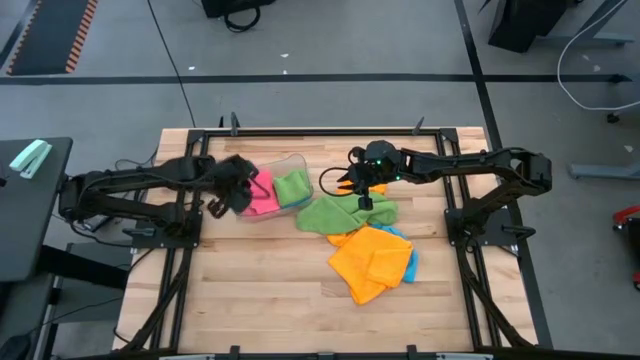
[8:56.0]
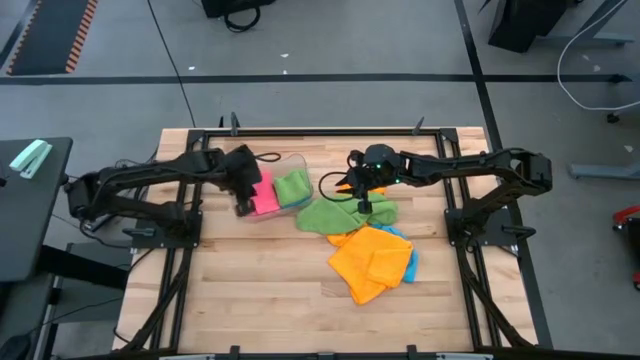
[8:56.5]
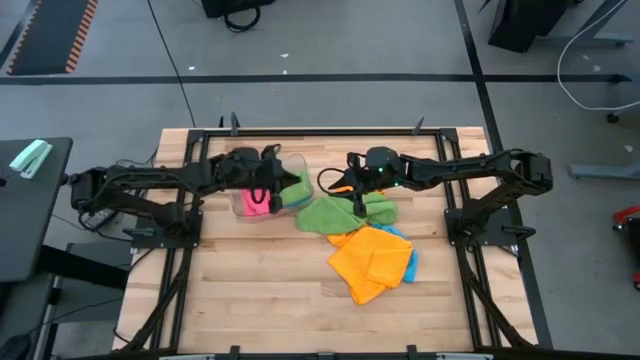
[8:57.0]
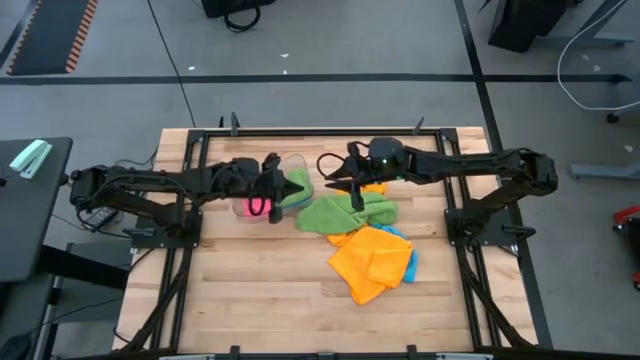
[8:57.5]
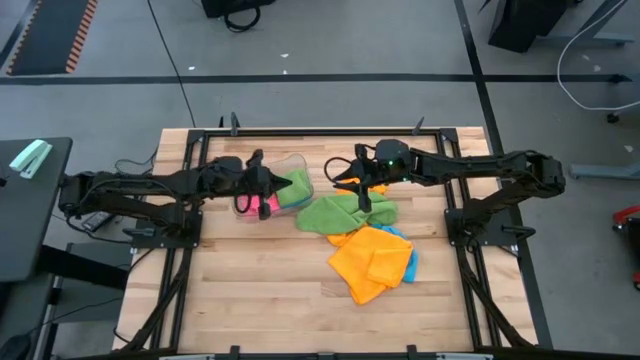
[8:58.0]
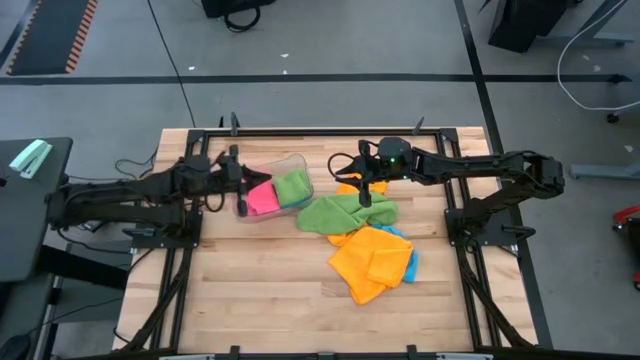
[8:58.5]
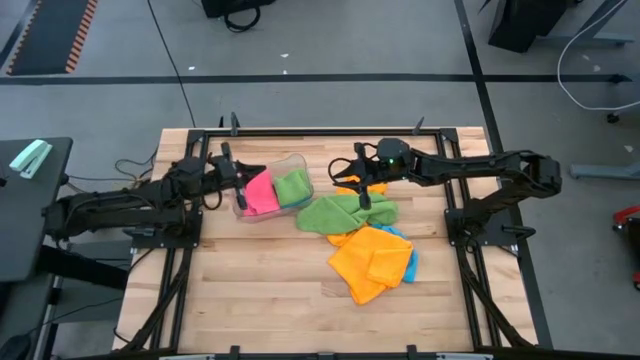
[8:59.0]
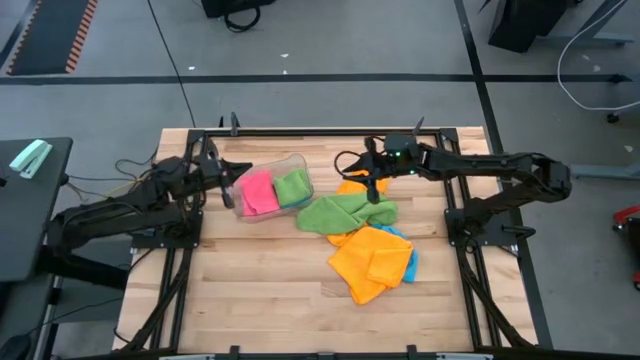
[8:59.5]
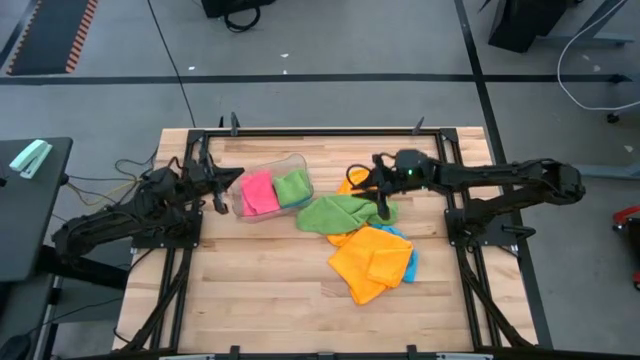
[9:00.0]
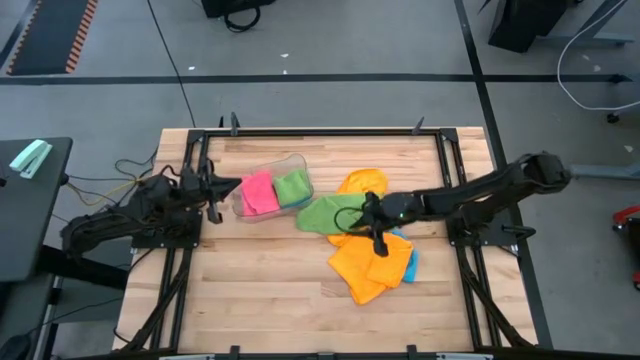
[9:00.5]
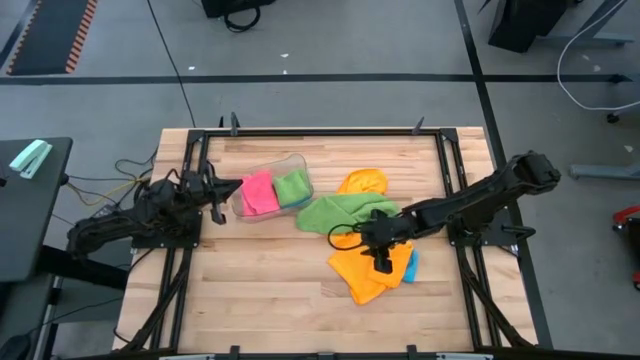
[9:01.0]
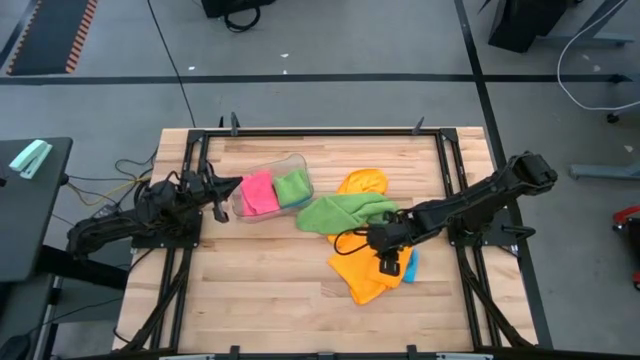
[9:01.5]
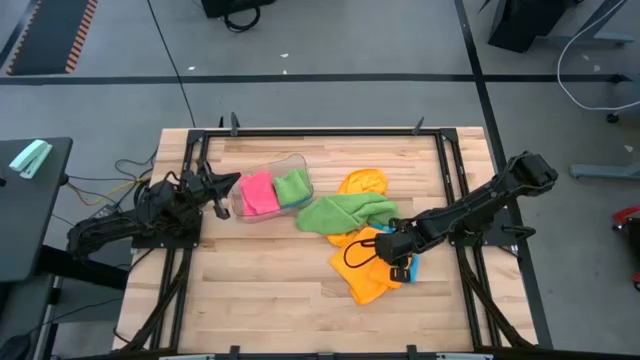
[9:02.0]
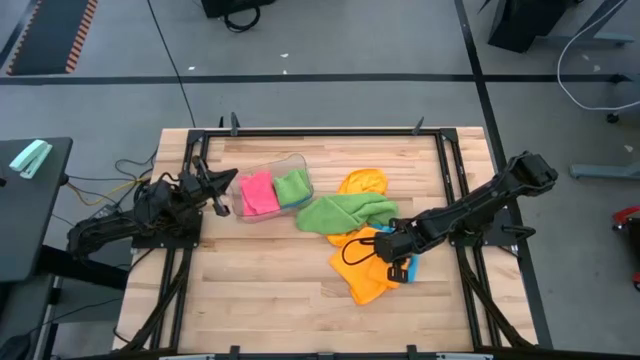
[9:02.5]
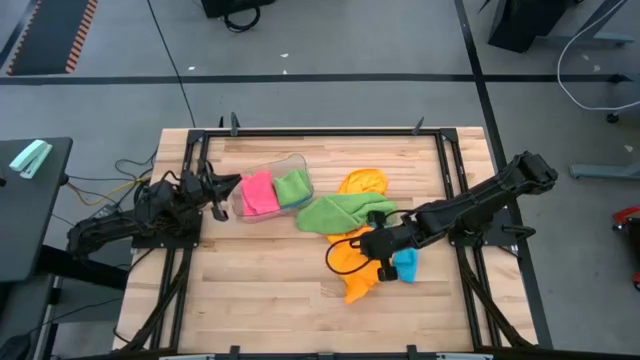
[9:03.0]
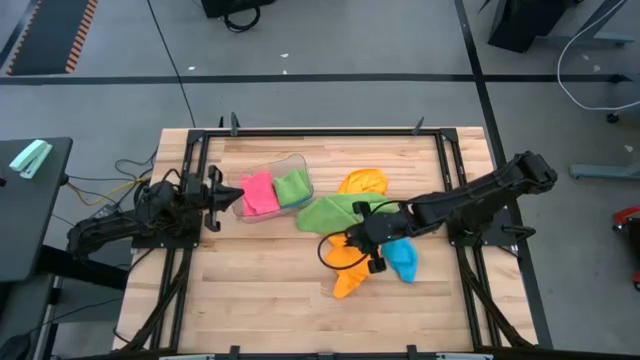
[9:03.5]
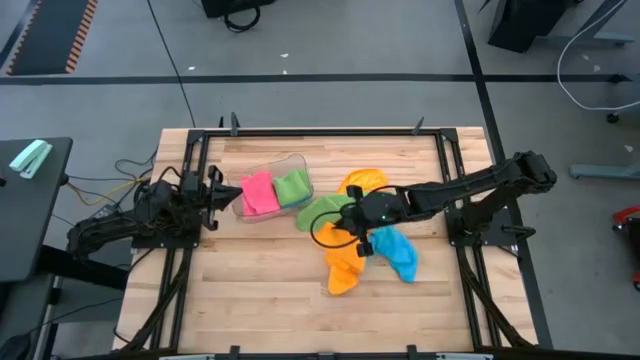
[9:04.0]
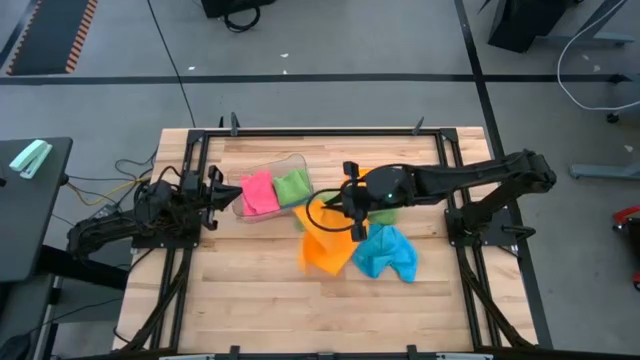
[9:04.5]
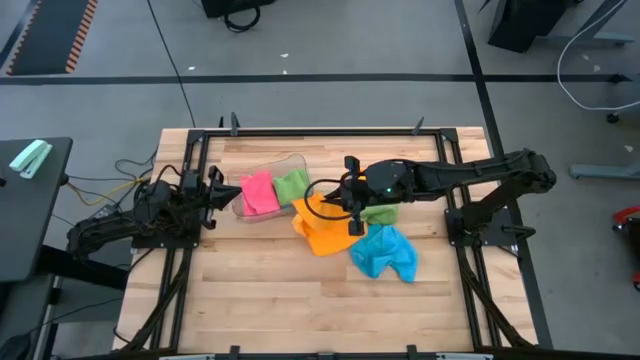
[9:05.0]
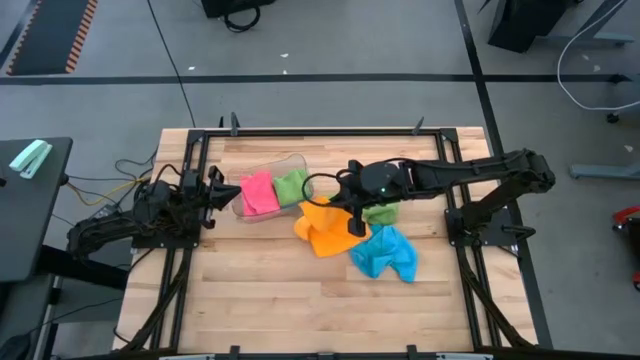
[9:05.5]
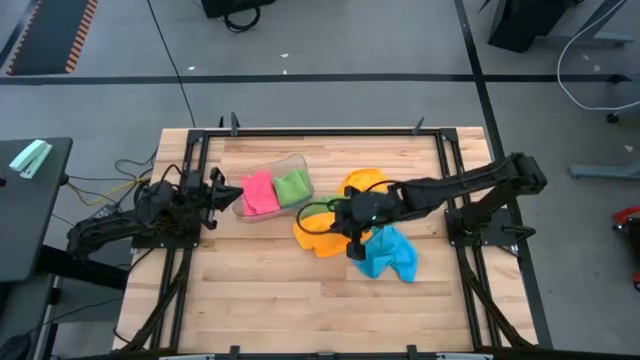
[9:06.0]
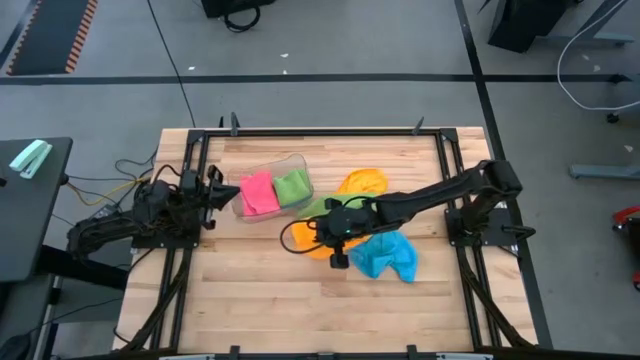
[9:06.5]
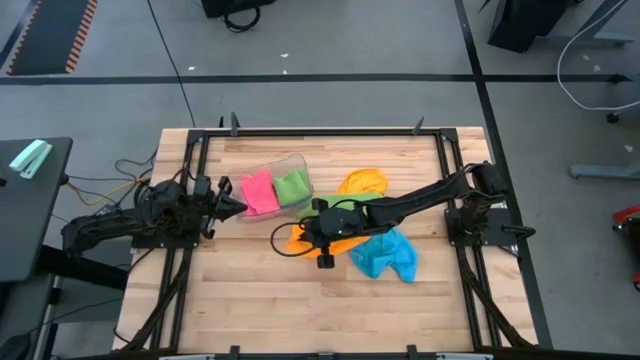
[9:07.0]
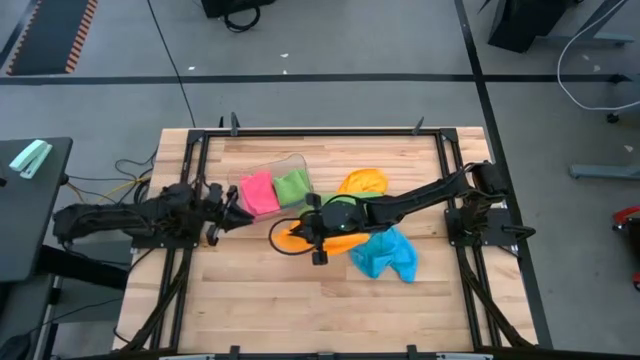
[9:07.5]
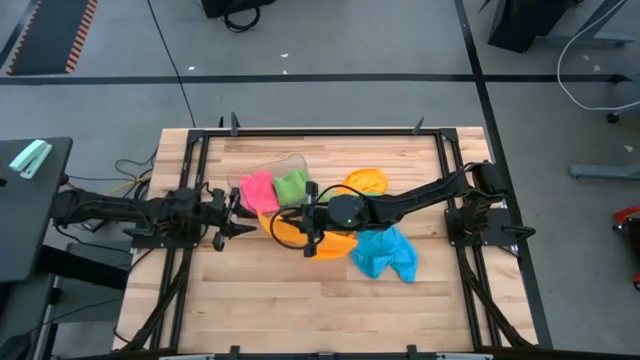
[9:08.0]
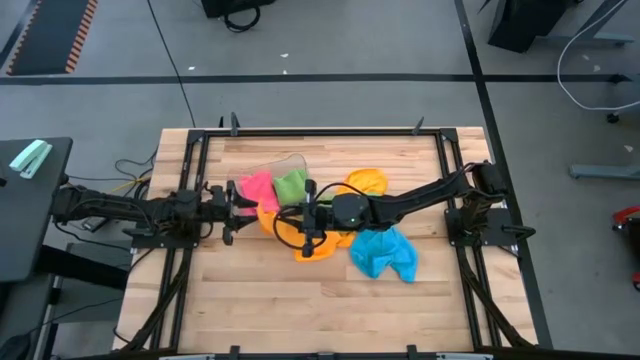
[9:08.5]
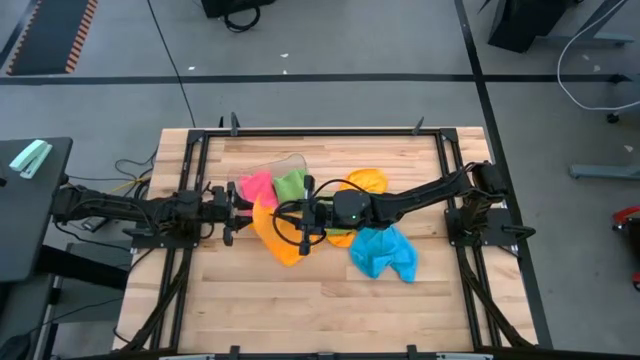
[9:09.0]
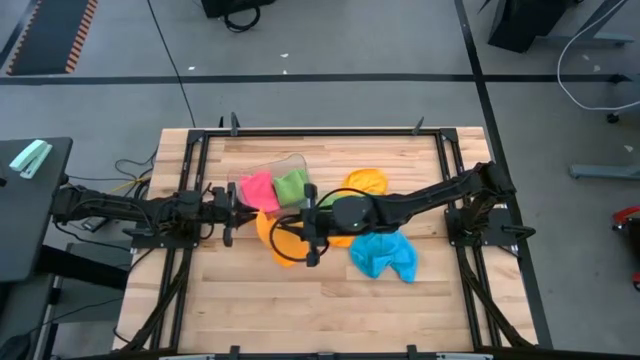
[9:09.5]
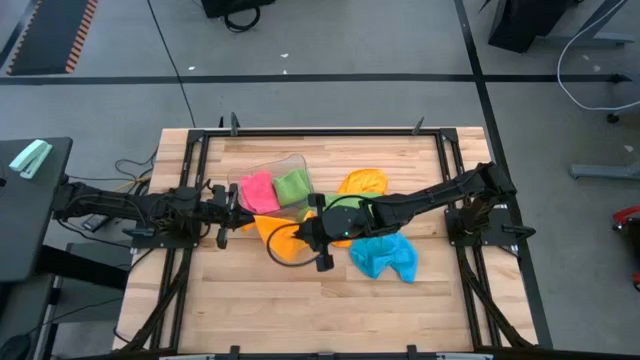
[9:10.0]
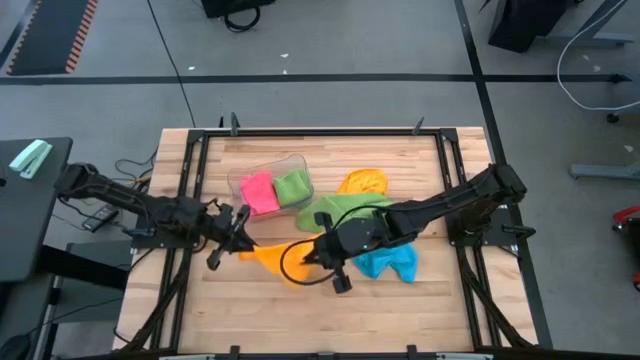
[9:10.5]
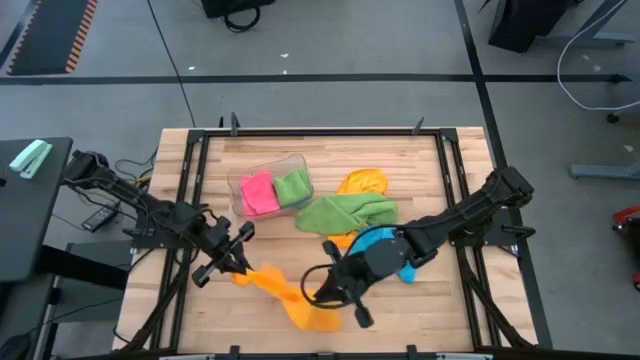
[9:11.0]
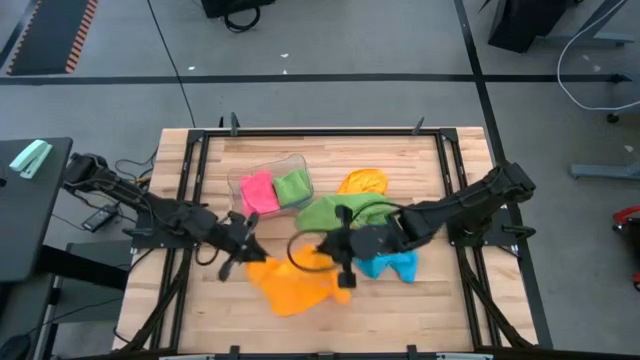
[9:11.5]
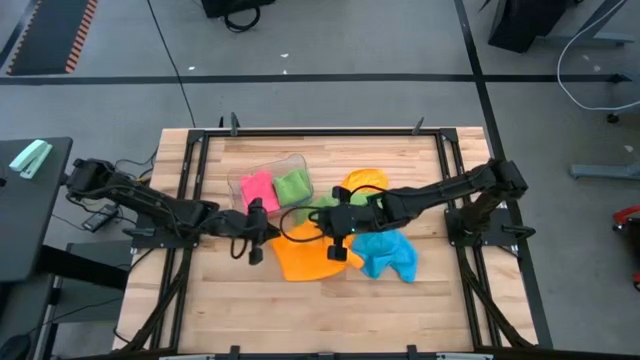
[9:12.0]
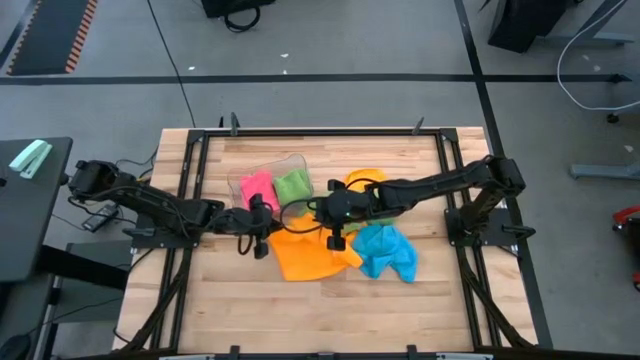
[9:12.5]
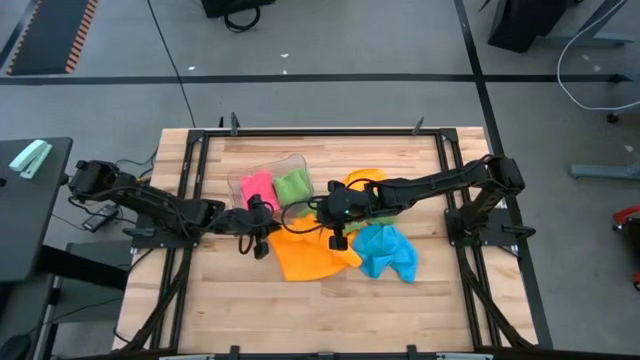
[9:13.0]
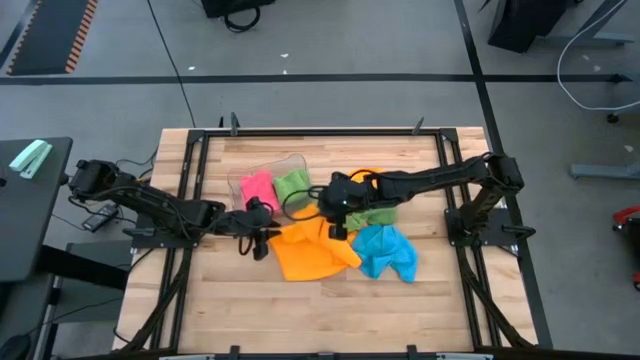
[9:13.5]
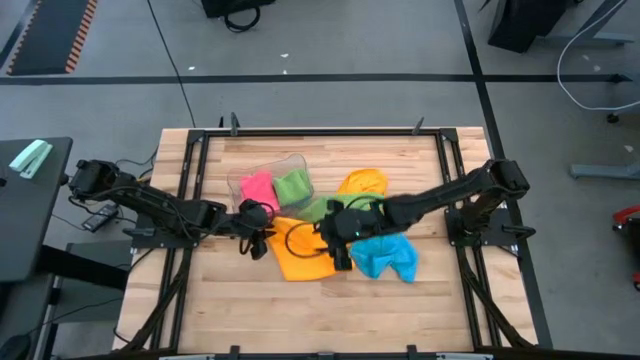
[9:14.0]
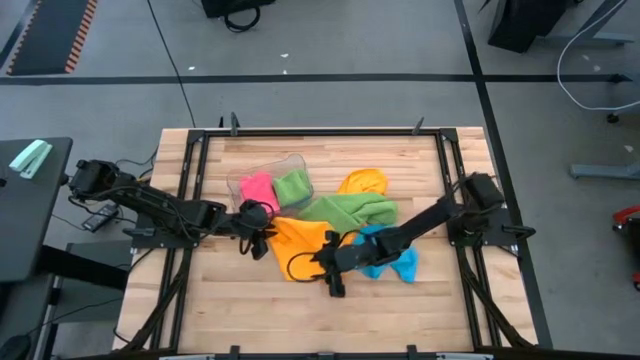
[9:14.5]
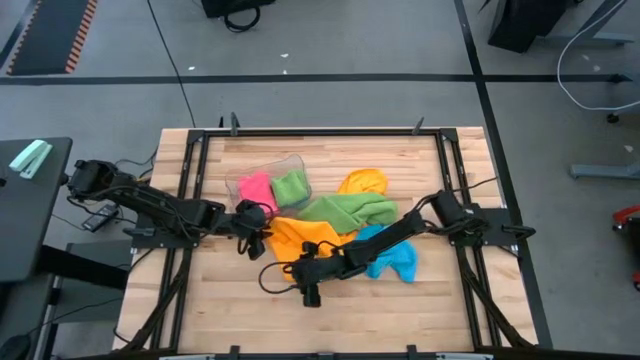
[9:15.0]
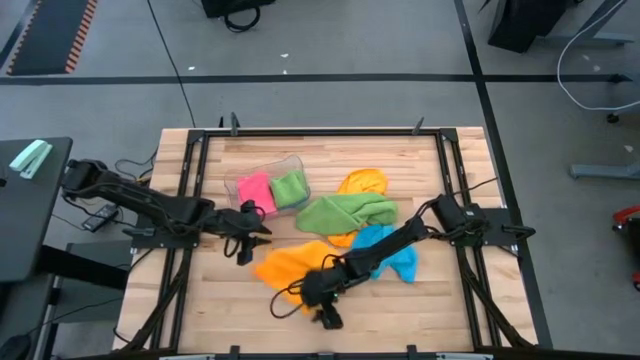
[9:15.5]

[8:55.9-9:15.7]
Task: Fold microfiber towels
Fold the bottom yellow microfiber towel
